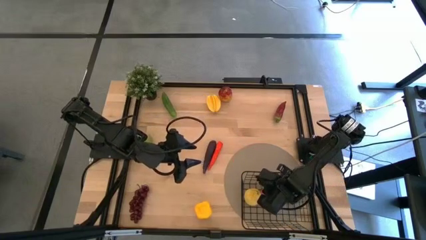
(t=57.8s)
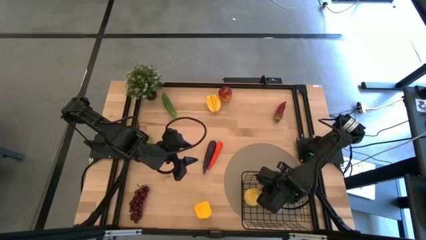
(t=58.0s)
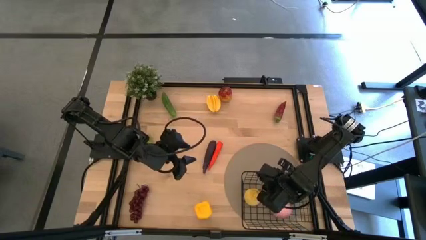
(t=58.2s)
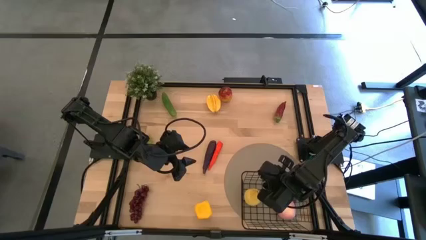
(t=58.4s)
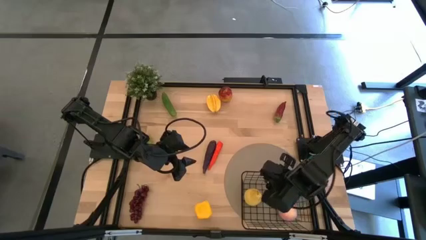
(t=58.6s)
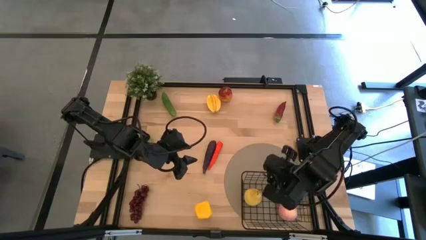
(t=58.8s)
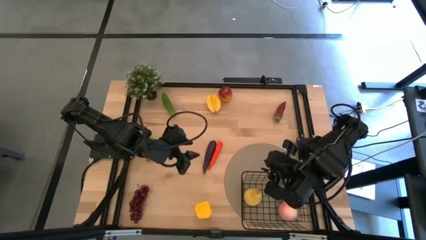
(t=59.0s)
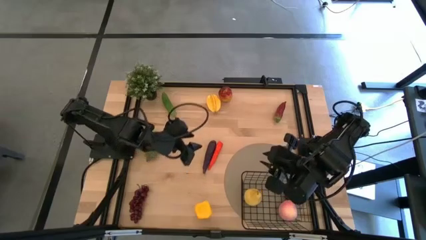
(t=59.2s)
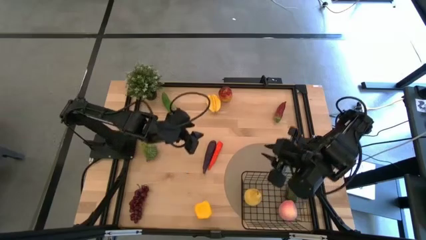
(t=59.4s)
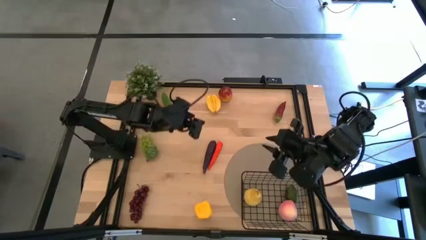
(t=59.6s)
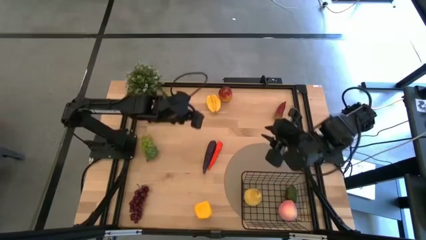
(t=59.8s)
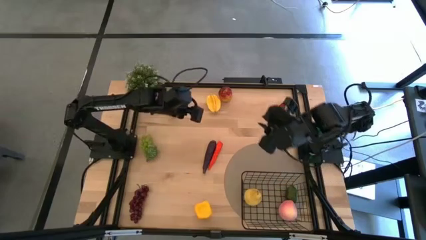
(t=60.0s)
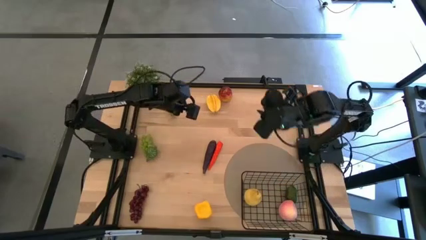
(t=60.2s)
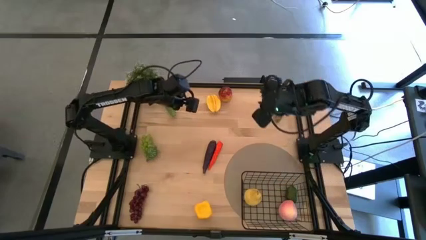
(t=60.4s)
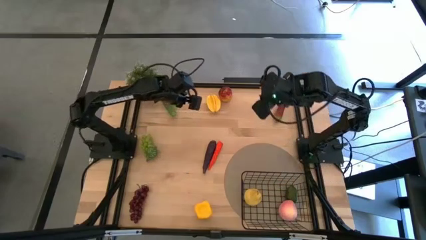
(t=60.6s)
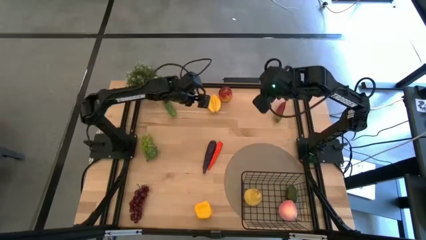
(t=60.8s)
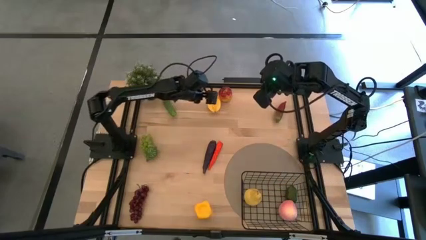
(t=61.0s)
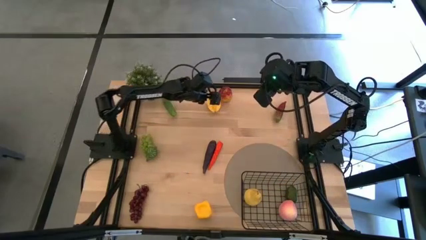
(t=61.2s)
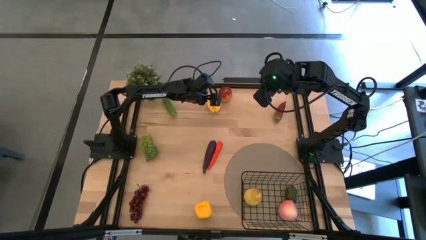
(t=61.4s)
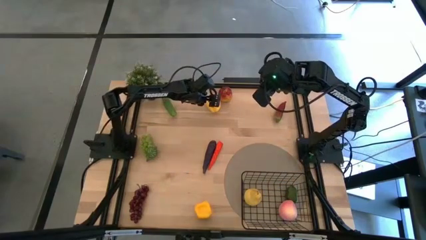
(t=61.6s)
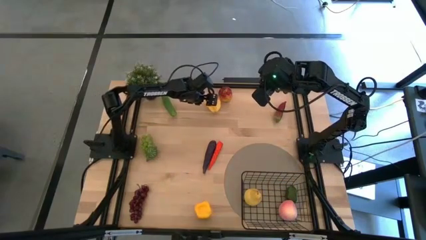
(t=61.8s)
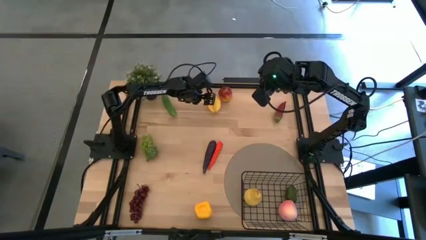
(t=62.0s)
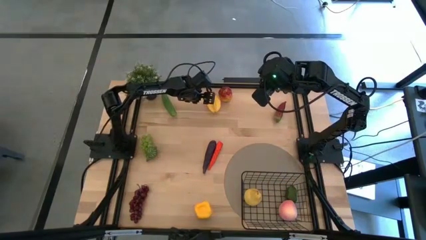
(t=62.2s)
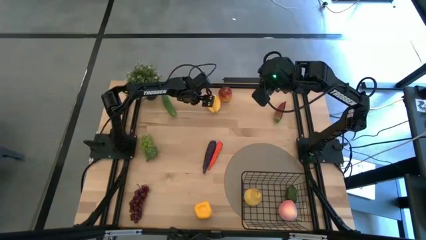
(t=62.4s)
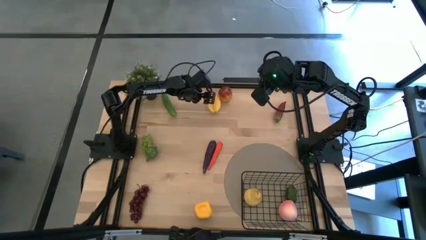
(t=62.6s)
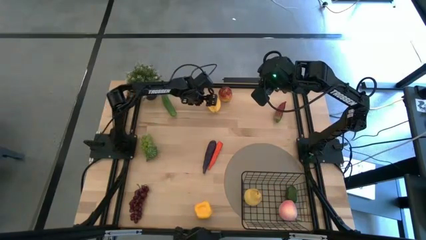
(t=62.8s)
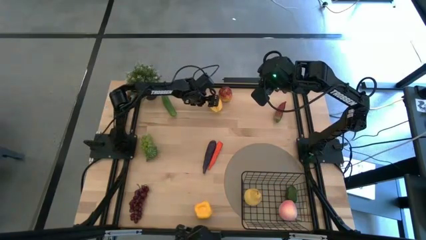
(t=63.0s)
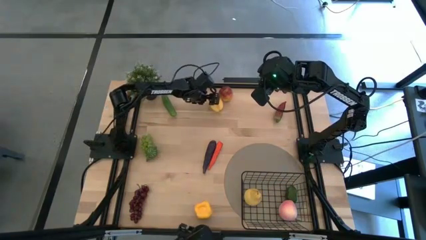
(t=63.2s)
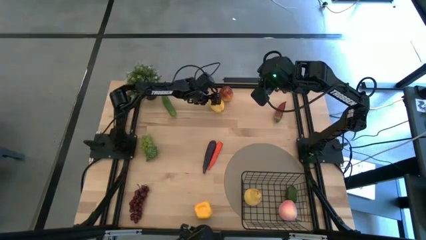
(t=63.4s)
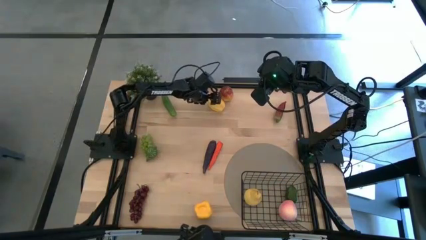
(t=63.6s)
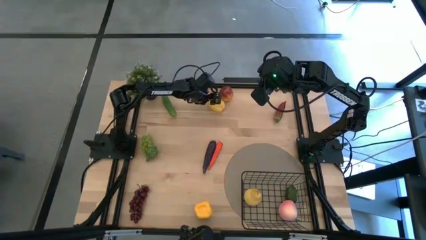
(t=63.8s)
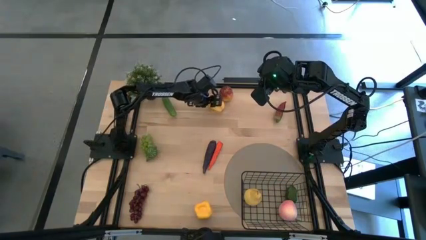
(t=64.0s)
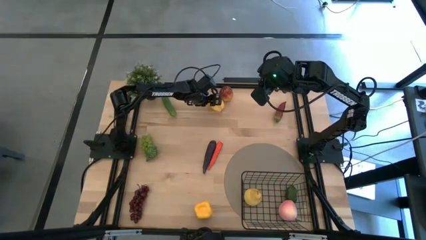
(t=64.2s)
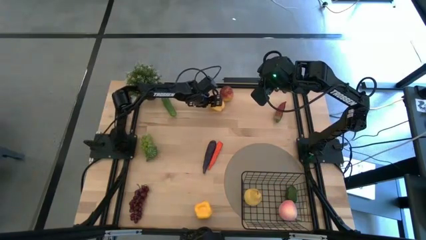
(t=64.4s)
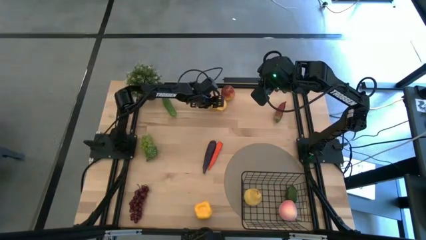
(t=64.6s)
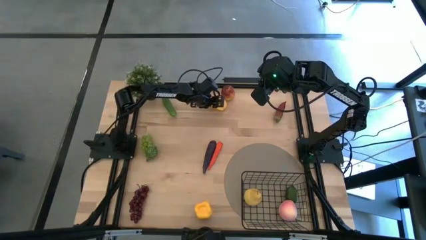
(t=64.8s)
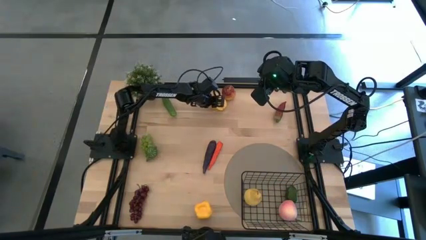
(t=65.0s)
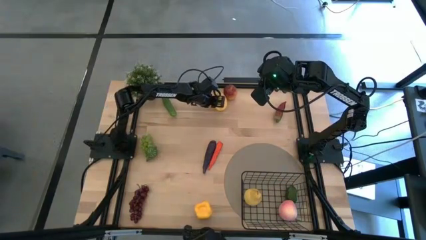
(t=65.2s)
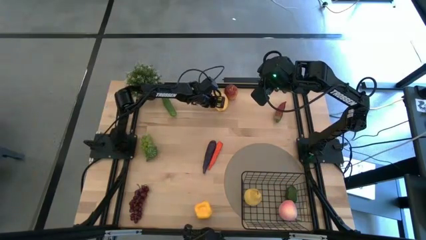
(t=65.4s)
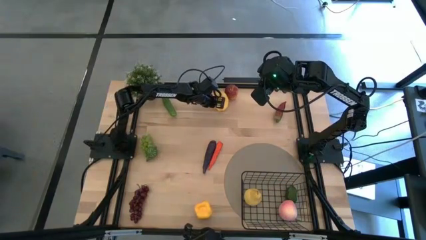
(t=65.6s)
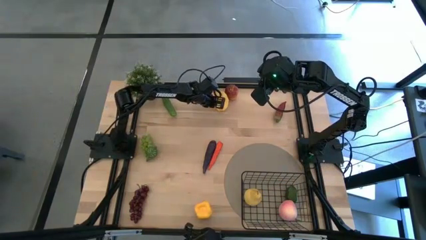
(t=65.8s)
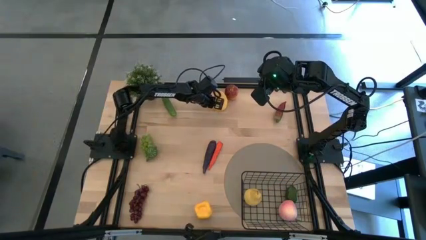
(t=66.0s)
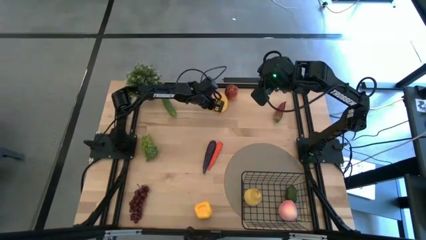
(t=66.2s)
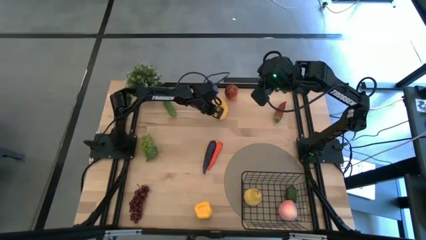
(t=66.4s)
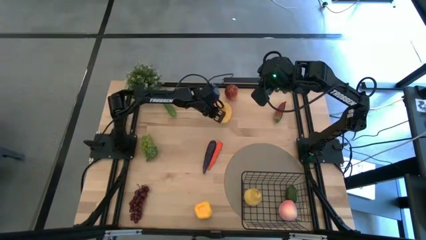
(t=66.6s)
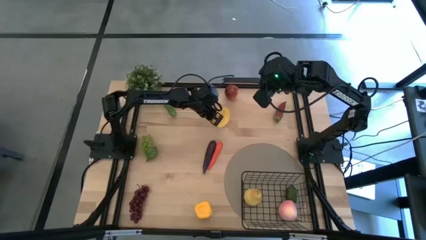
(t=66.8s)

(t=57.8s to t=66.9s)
Task: Build produce basket
Put the yellow star fruit into the wire basket

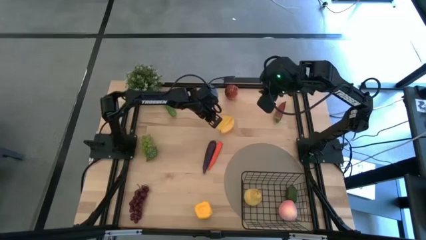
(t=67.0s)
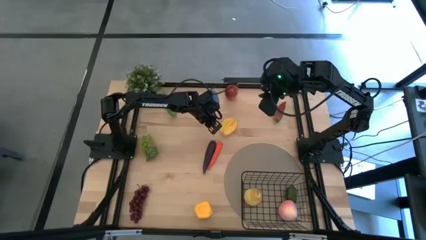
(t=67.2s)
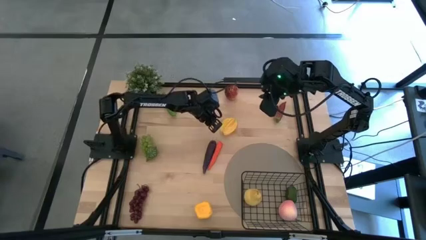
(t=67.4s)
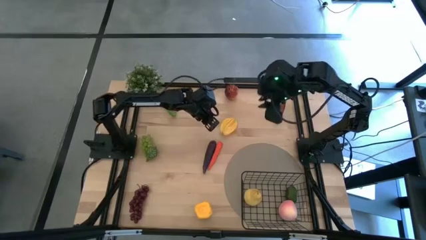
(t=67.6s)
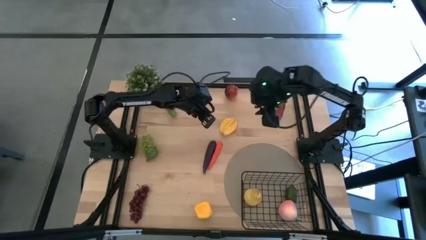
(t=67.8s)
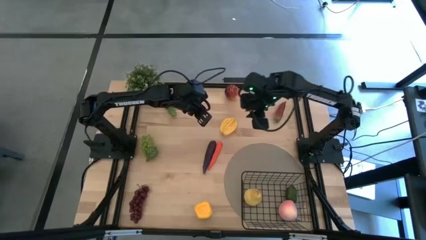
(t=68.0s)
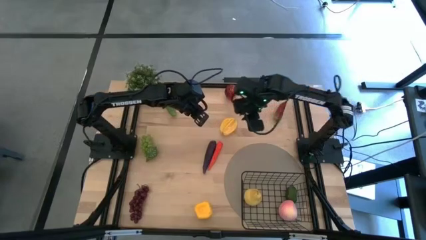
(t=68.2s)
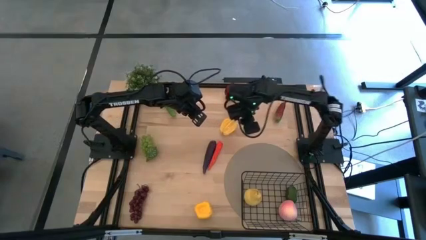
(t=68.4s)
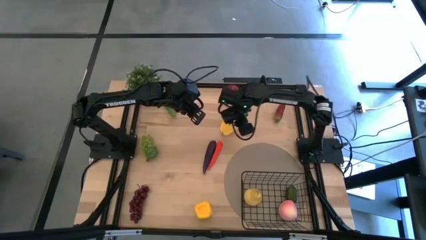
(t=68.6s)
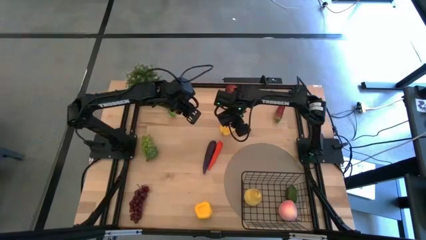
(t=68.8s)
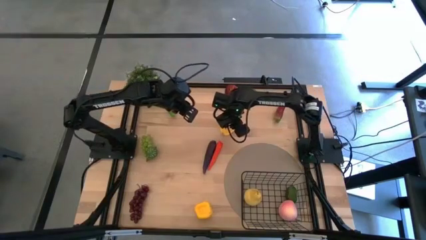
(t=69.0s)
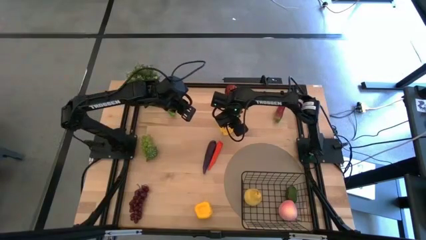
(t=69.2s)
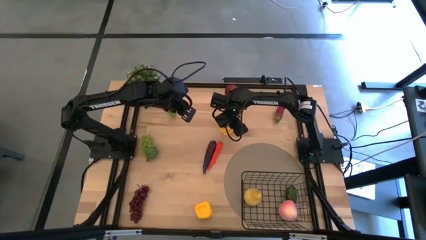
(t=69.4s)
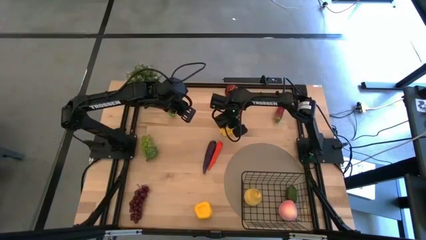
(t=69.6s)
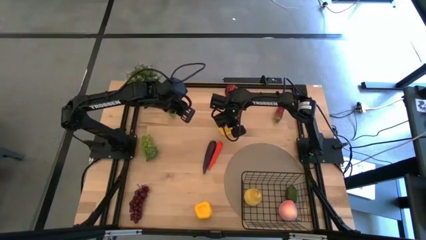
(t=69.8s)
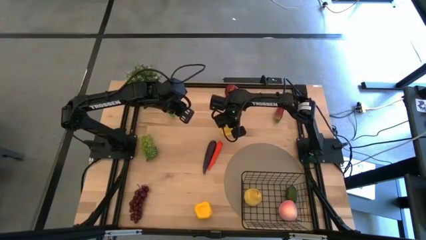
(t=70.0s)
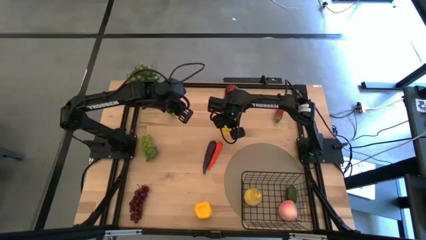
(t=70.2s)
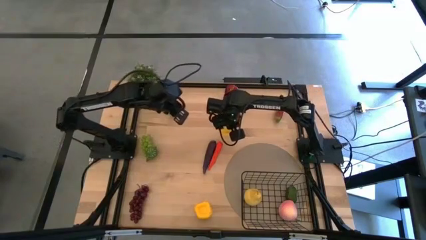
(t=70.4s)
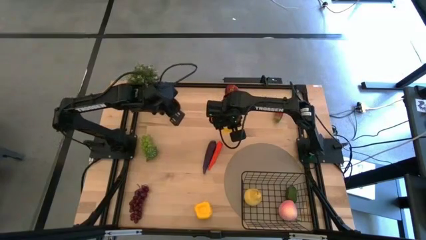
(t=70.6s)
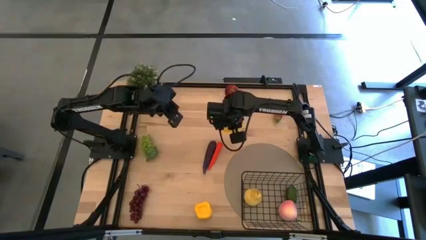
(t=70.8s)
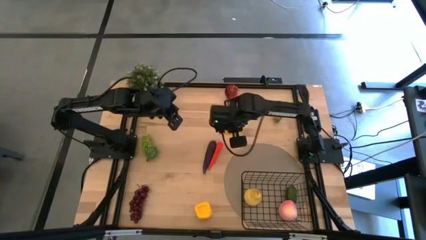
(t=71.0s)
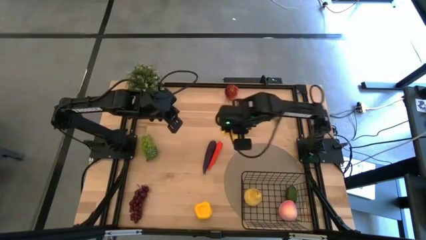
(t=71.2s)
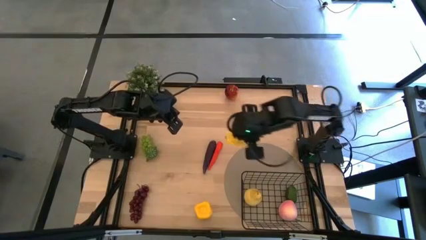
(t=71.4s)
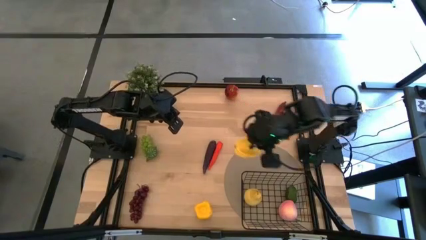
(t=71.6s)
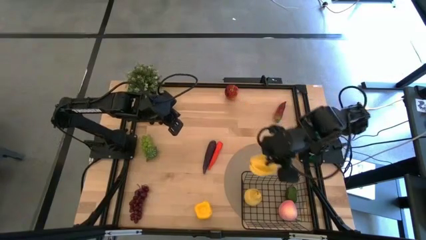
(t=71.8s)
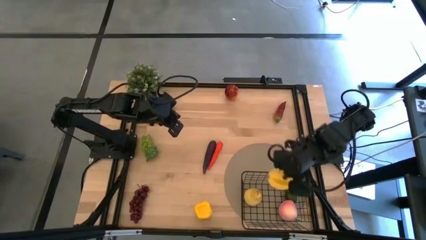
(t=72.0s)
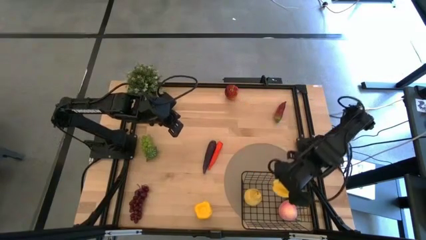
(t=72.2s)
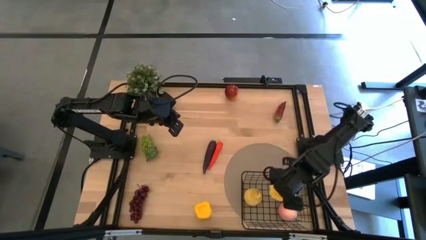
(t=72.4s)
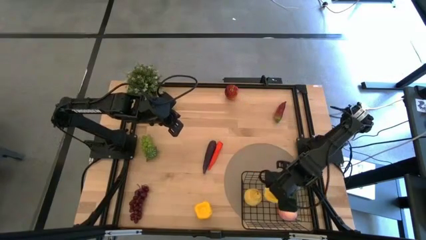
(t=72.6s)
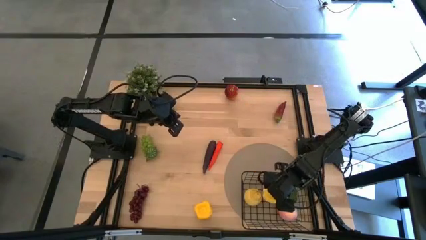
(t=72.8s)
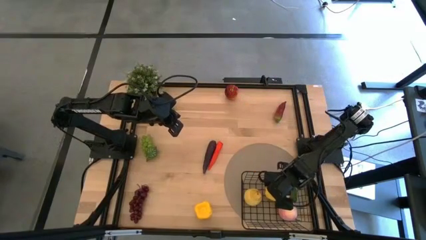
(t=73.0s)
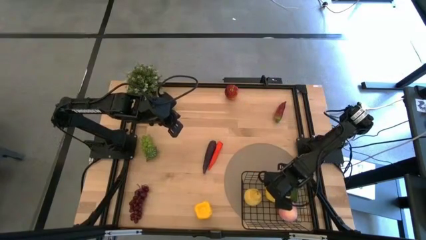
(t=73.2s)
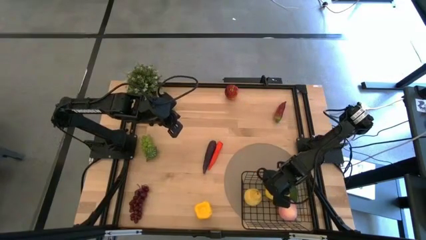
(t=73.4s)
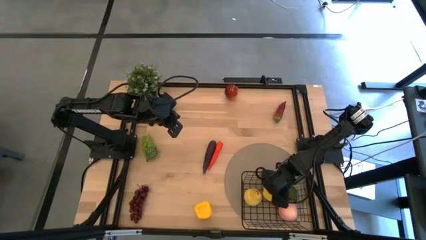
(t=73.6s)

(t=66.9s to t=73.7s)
Put the yellow star fruit into the wire basket

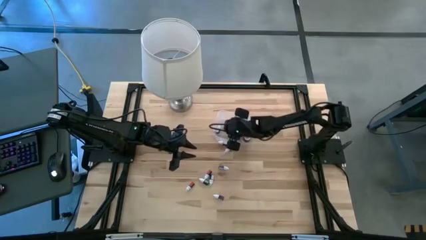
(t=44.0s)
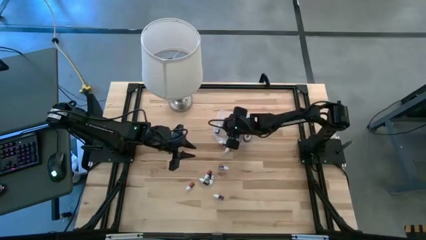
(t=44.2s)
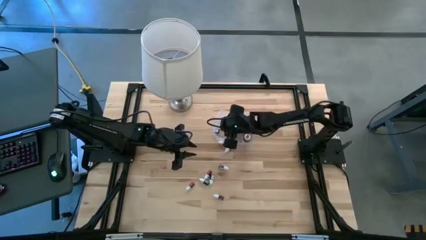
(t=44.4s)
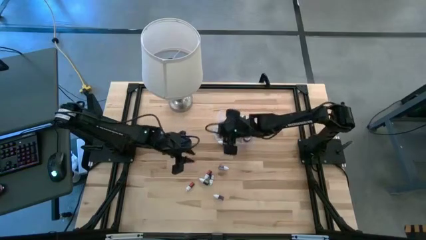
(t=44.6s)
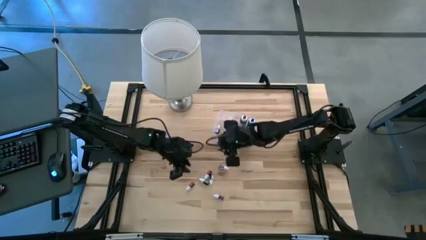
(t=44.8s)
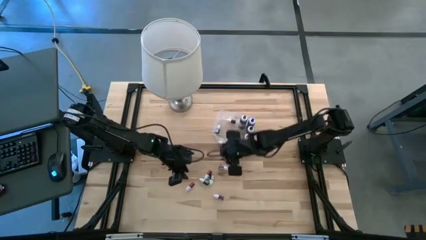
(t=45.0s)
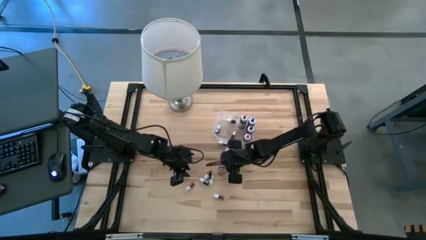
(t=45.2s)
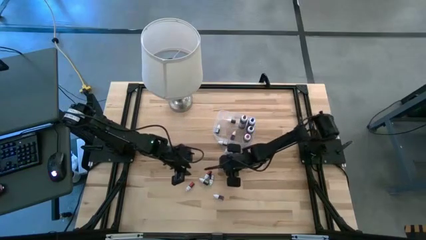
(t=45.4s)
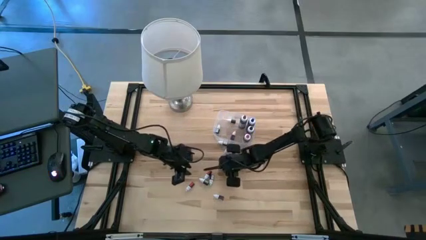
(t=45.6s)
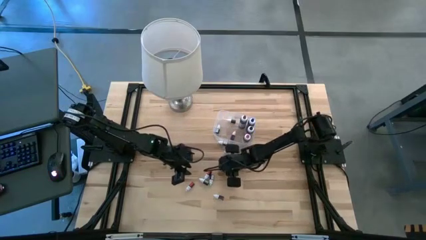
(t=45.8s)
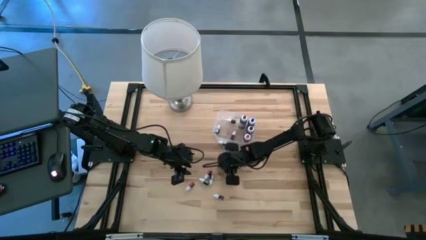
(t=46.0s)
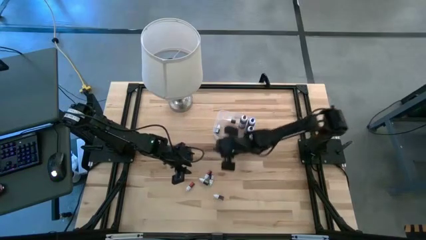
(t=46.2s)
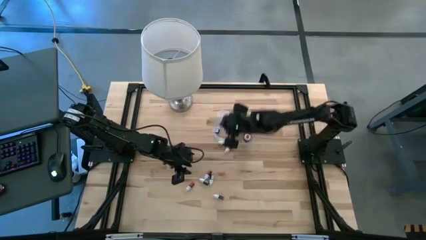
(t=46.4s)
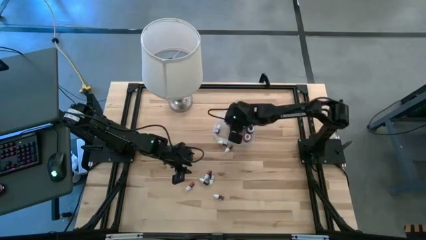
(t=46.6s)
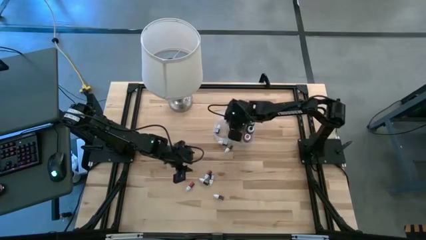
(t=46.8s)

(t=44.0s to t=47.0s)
Task: Pick & Place food coloring
Put the small purple food coloring bottle into the transparent bin
